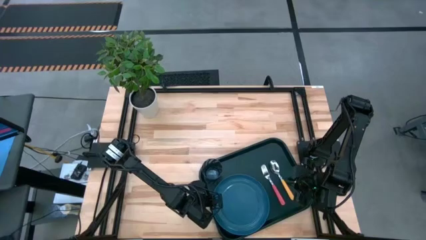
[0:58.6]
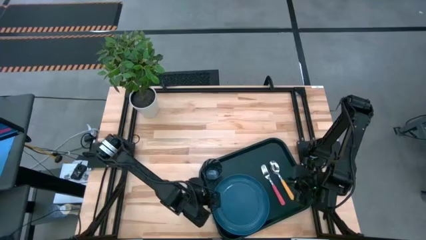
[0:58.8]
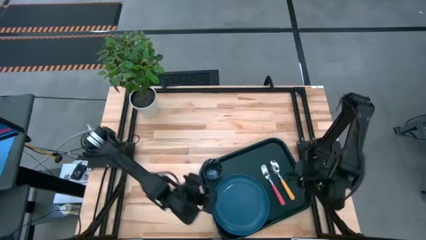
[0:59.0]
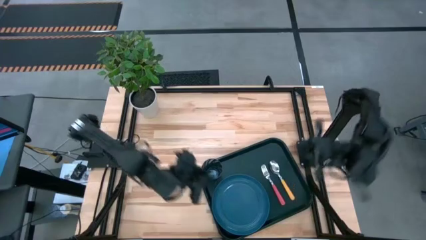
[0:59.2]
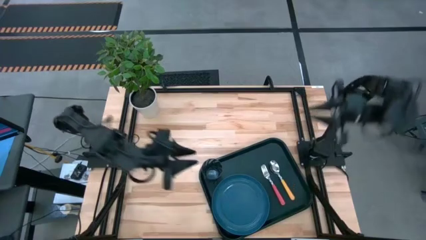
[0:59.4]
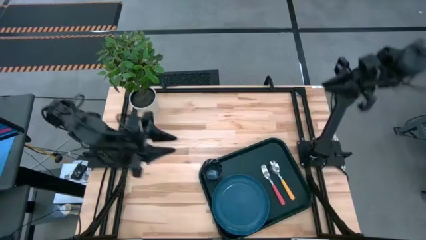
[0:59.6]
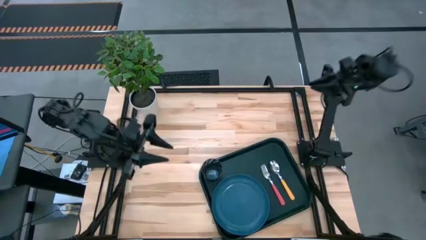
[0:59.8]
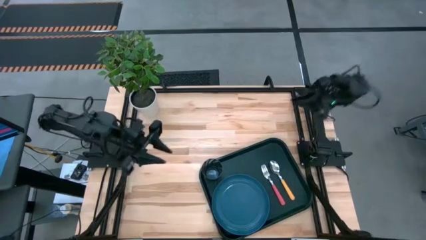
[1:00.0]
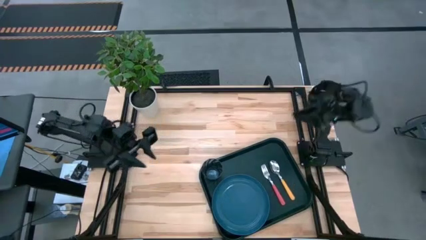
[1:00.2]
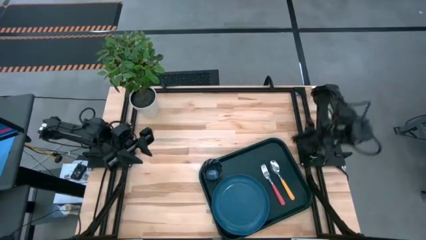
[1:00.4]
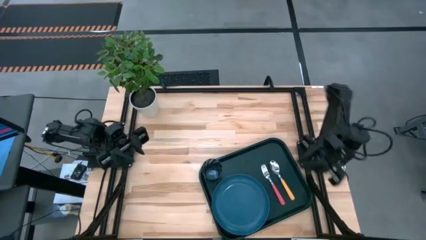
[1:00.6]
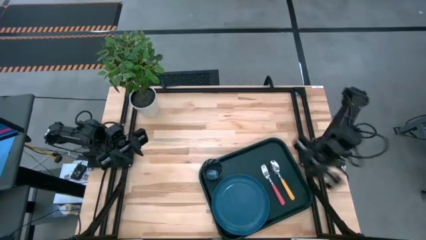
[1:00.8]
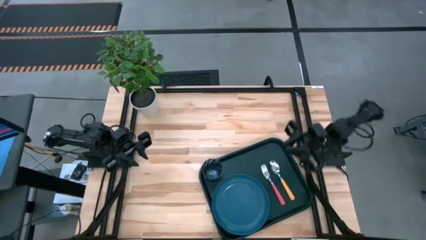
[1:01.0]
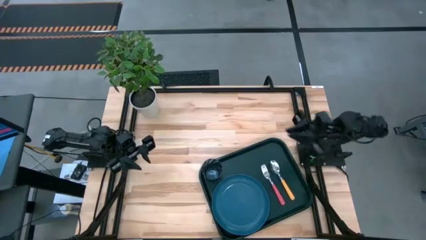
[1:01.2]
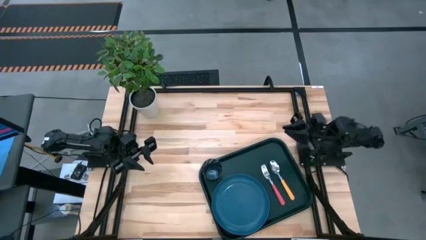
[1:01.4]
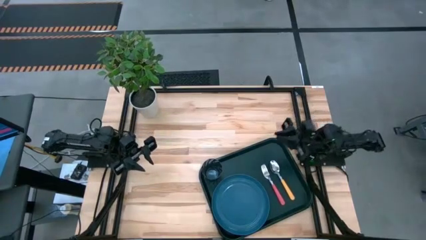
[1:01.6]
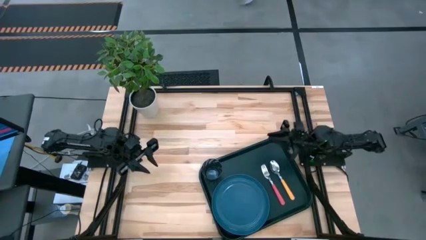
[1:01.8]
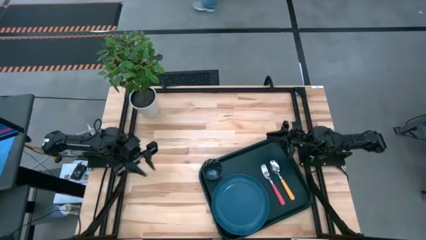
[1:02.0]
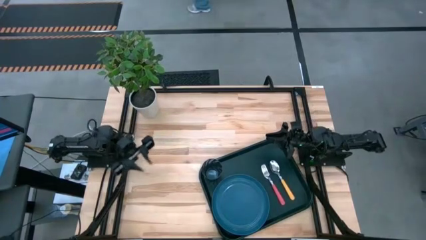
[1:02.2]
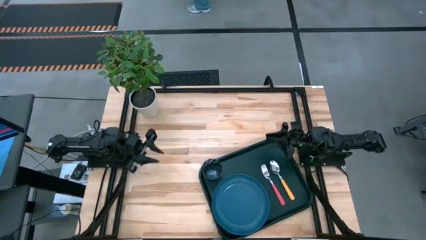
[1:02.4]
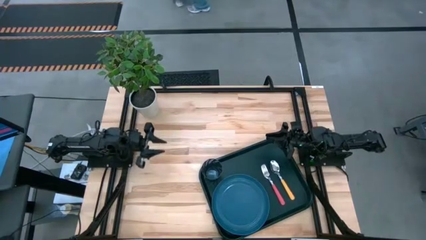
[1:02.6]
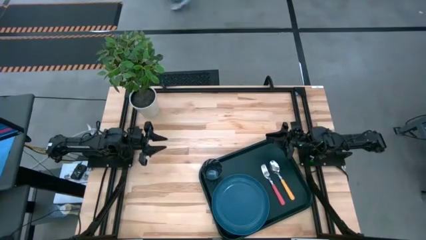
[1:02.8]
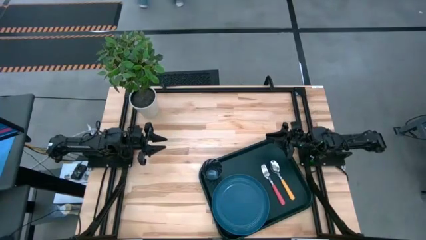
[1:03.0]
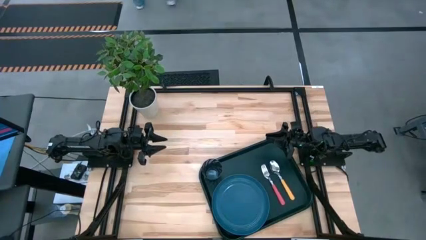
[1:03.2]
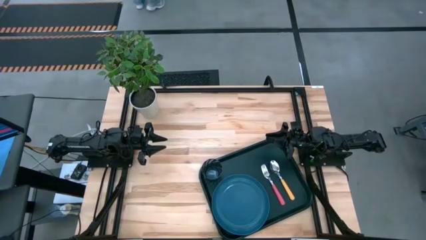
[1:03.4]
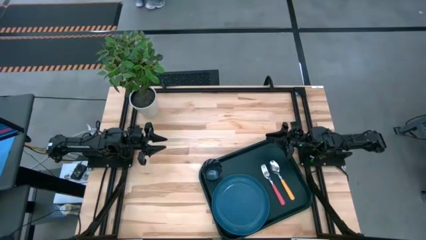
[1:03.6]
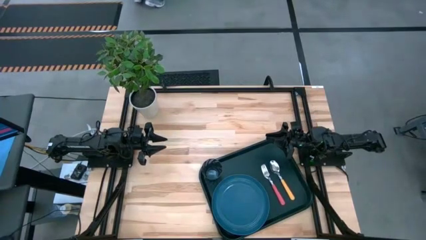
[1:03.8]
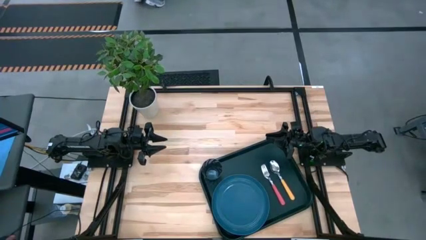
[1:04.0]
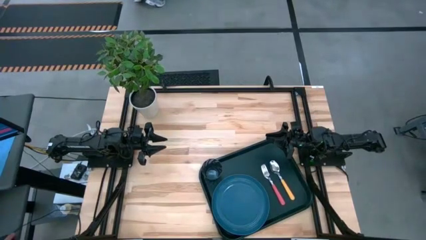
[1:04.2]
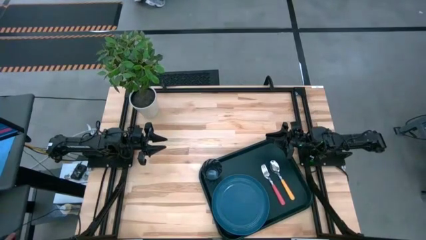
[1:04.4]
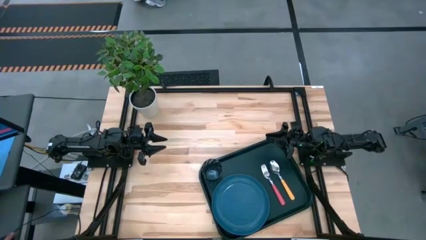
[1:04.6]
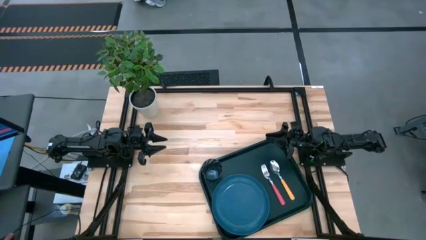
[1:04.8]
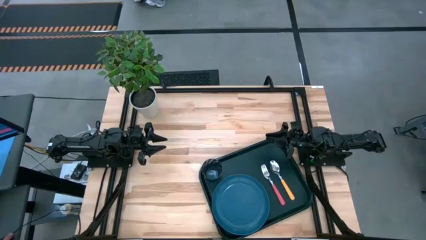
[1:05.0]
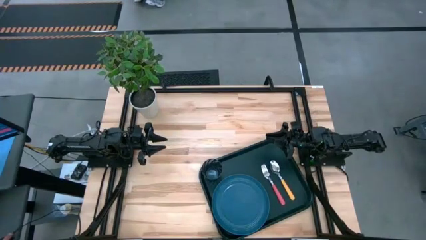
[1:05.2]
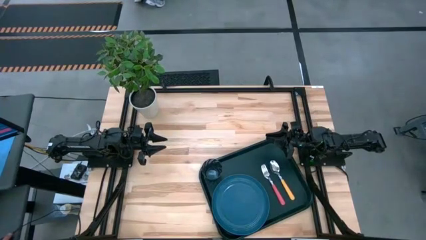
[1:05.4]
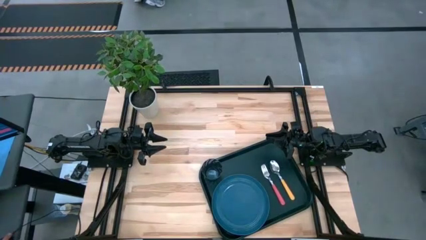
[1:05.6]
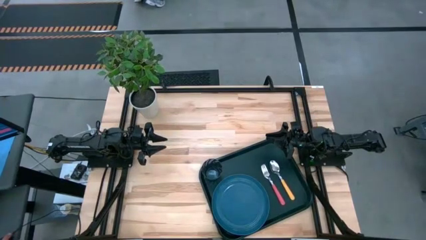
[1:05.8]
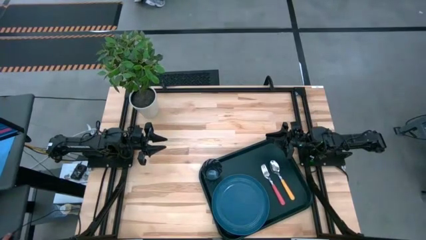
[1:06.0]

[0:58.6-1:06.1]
Task: Pick and place plate/cup/fork/spoon on tray
Return to Home Position

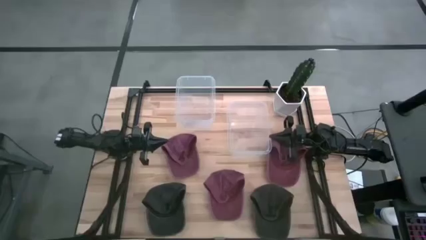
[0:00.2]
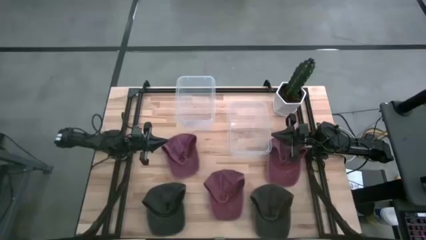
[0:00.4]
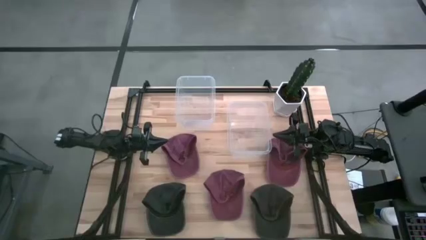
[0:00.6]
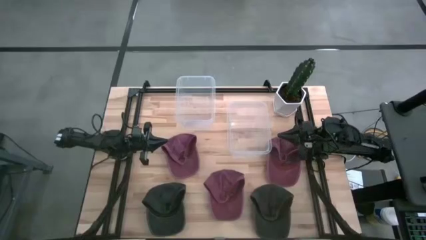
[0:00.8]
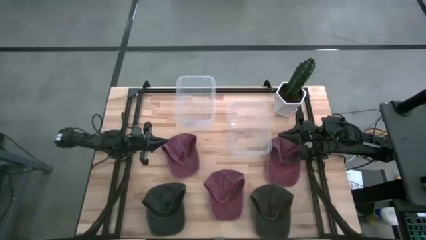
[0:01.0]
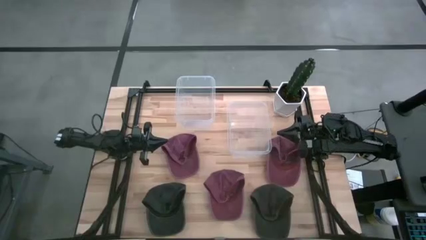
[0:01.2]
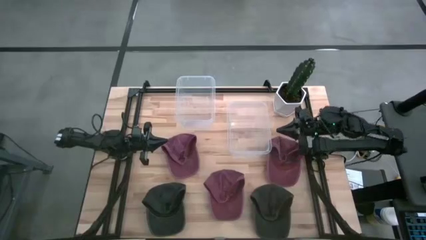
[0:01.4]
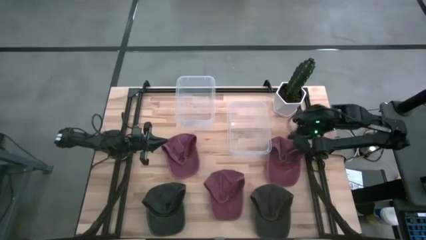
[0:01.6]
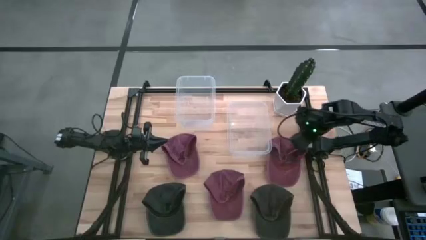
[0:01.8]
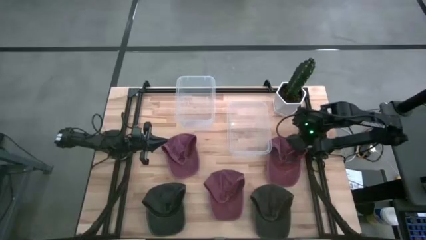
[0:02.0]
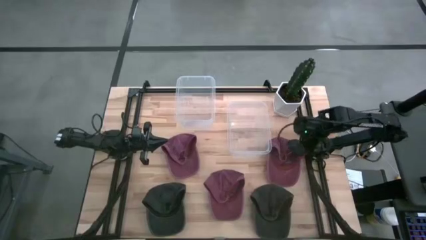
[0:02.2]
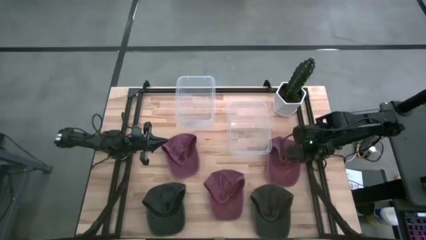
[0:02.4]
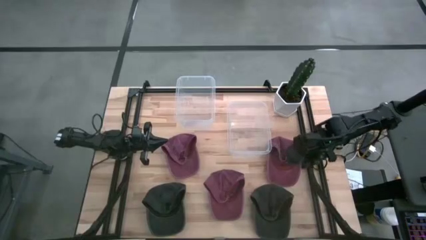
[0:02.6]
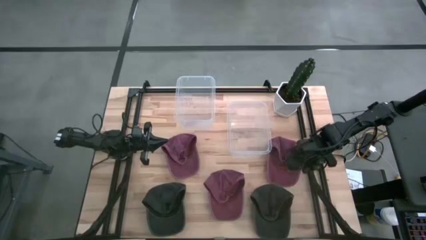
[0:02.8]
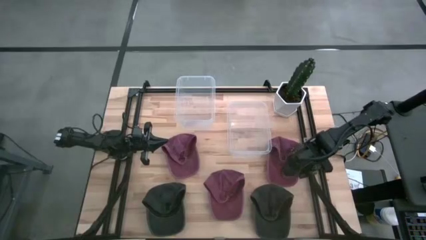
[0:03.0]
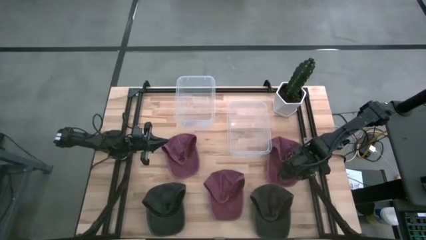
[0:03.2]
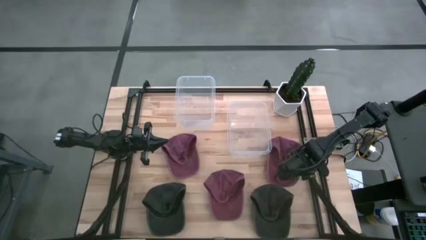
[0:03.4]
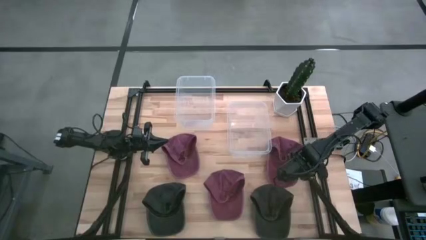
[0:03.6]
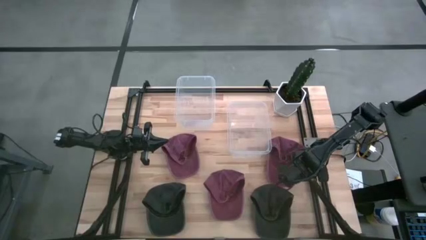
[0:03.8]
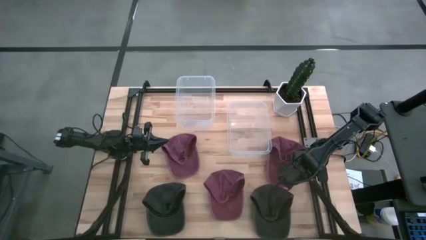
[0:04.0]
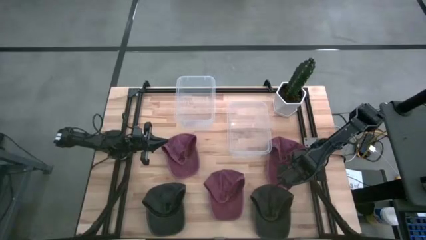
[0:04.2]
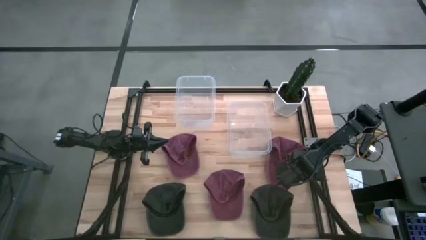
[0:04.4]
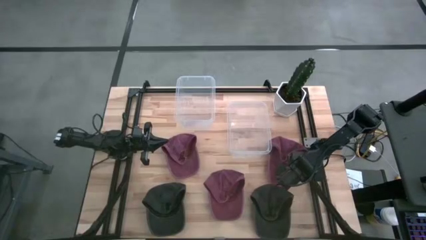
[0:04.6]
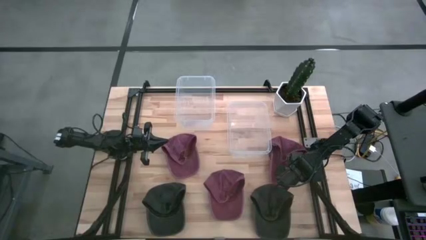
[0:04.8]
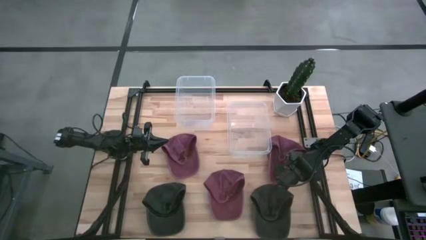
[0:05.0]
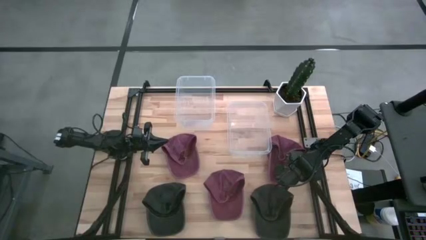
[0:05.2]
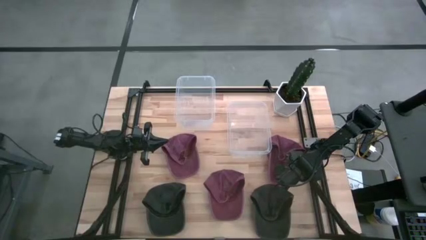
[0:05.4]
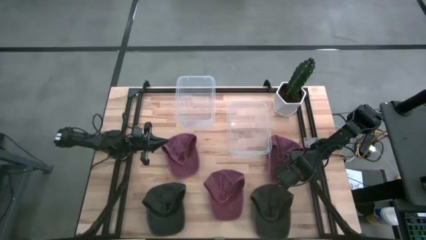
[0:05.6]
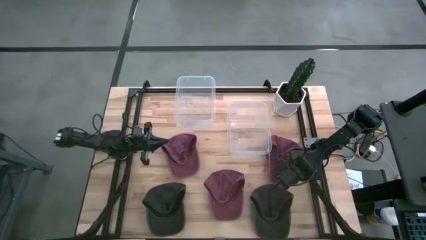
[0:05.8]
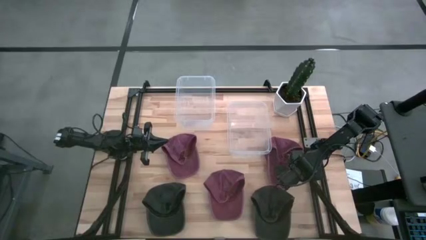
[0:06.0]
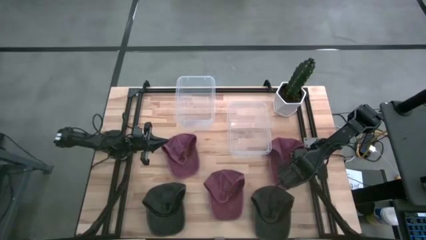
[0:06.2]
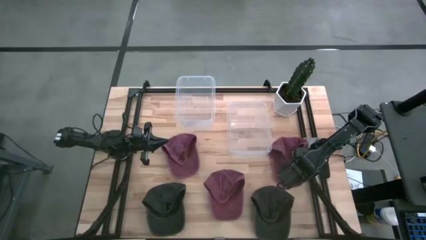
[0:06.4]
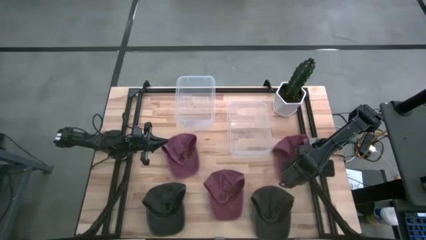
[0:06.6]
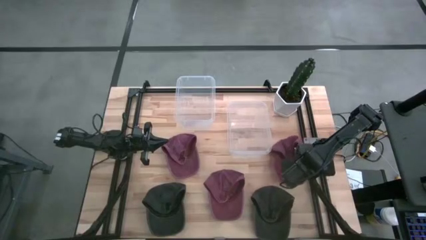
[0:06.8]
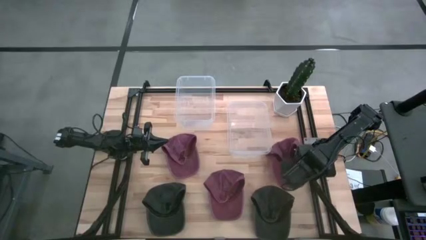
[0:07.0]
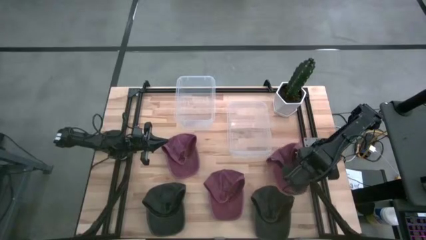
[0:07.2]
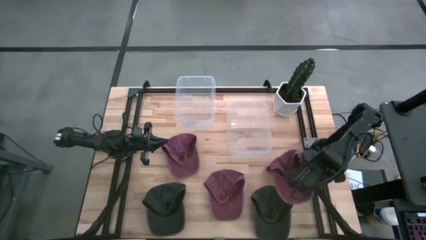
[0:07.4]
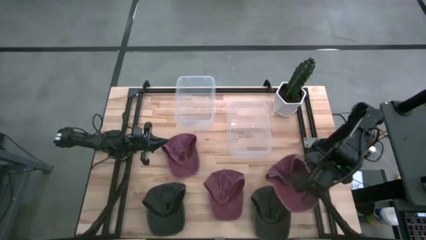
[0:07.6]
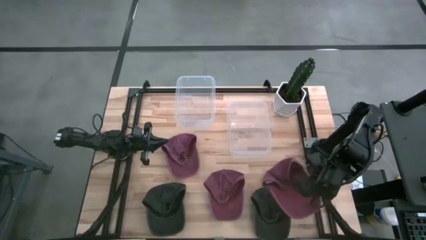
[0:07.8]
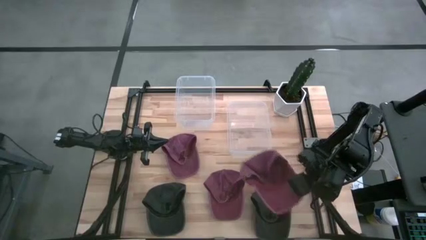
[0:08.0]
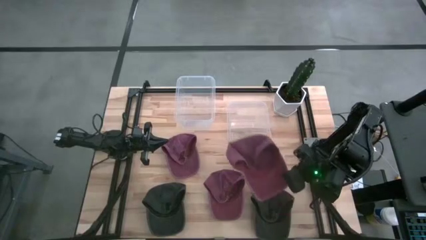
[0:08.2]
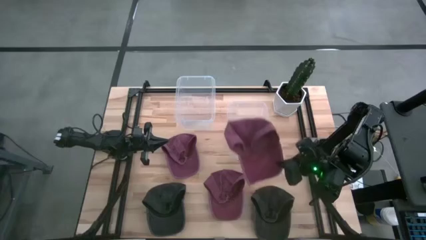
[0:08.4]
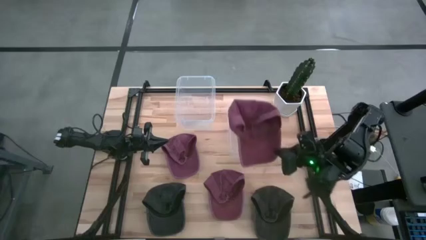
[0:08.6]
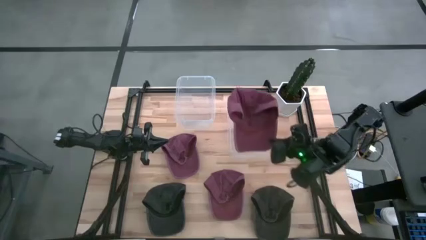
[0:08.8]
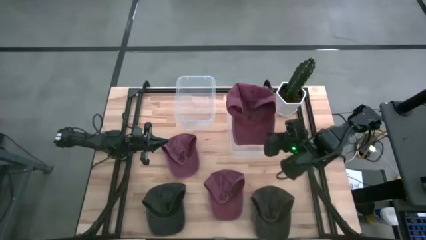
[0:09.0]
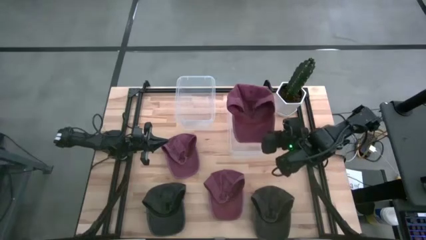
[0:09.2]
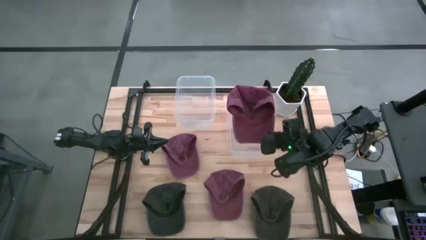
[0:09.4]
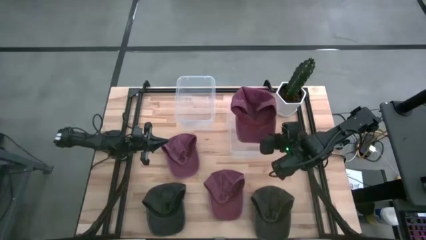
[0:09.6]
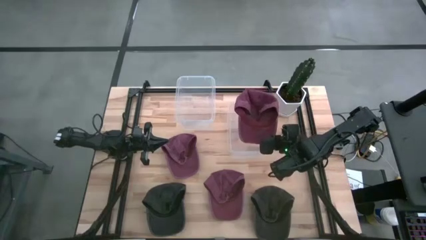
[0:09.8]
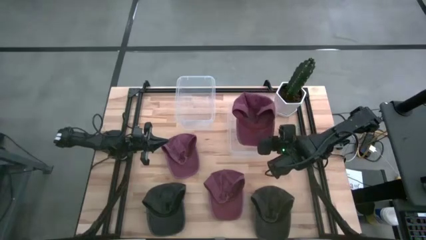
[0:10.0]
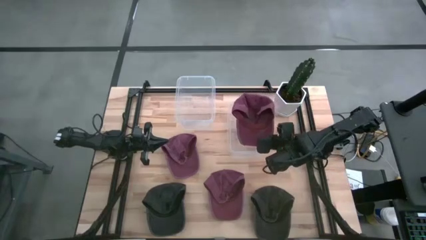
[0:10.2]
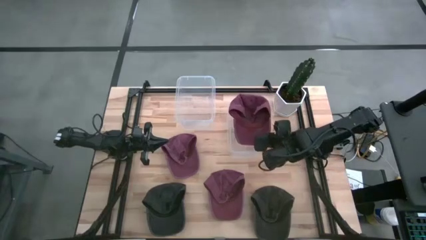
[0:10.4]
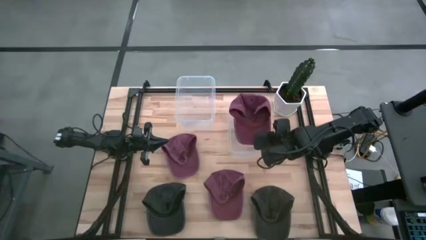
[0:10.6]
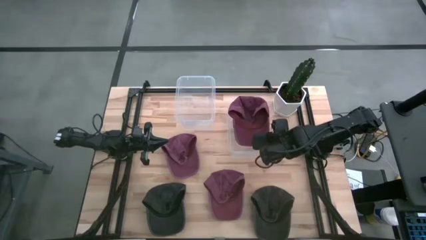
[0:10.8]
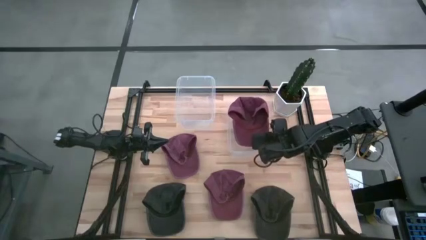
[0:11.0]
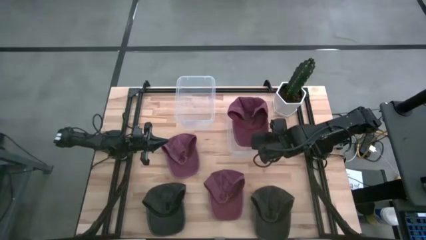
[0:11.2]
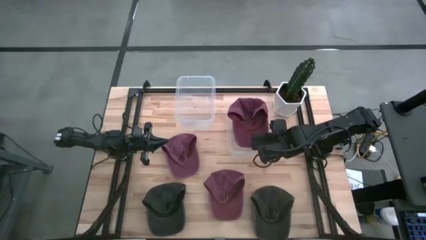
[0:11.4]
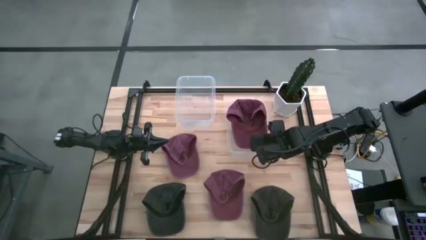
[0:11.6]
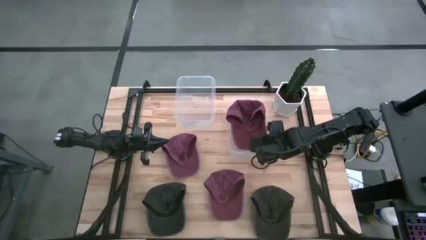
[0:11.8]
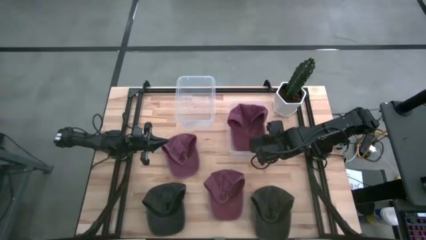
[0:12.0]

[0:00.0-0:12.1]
Task: Pick & Place hat
Put the top right red cap into the right transparent bin
